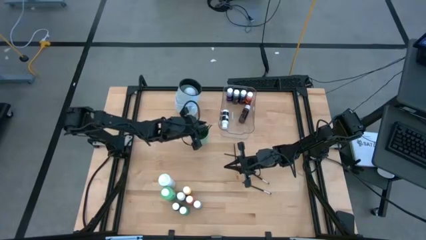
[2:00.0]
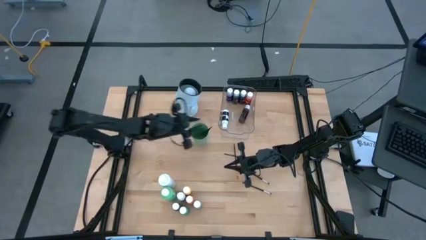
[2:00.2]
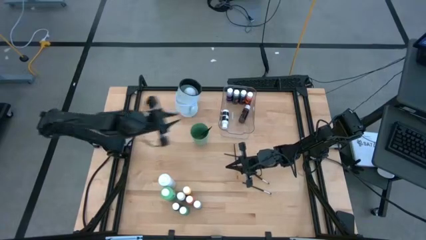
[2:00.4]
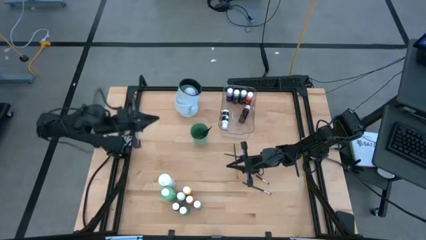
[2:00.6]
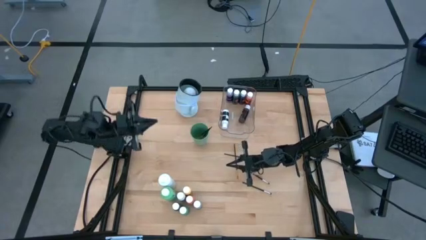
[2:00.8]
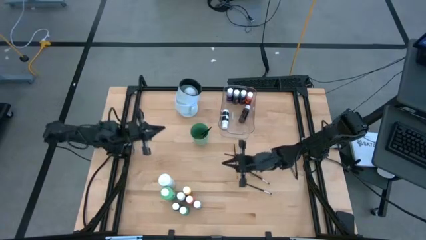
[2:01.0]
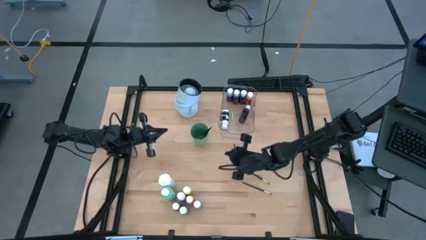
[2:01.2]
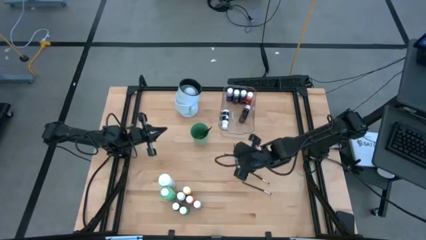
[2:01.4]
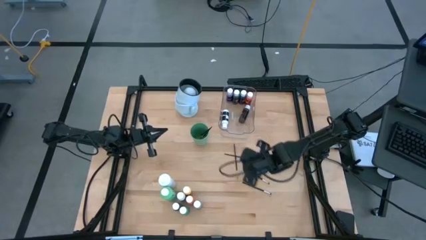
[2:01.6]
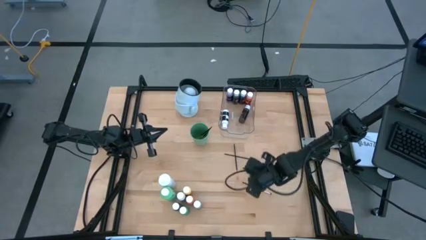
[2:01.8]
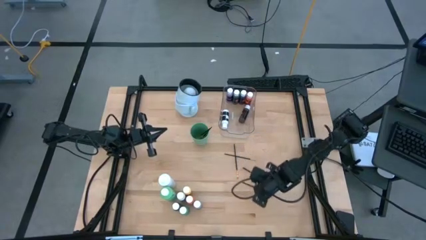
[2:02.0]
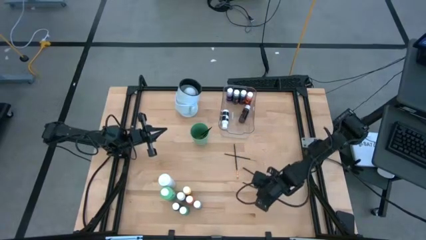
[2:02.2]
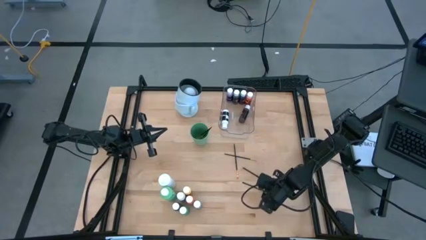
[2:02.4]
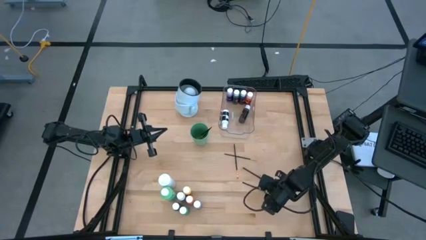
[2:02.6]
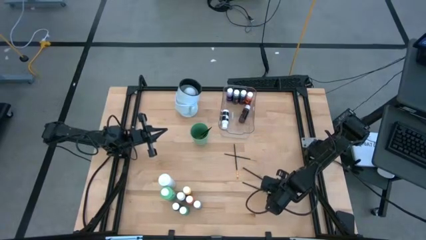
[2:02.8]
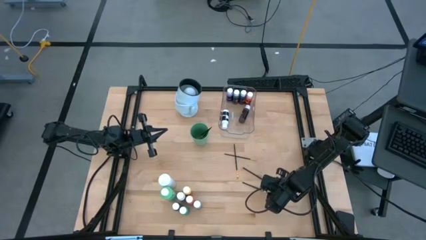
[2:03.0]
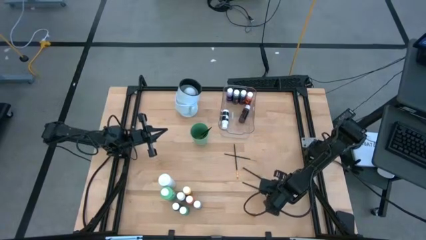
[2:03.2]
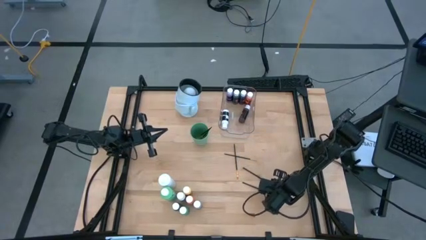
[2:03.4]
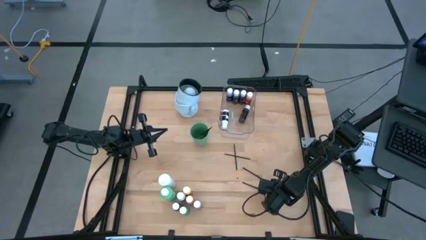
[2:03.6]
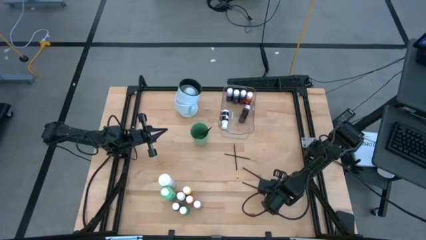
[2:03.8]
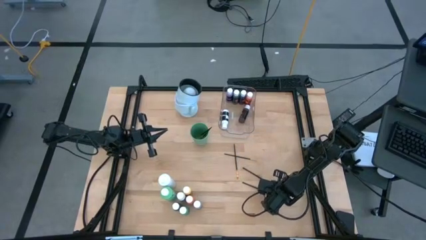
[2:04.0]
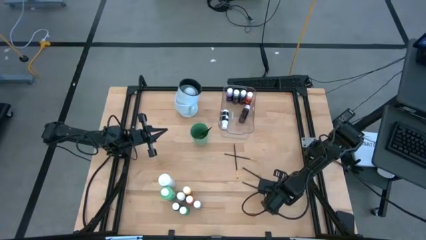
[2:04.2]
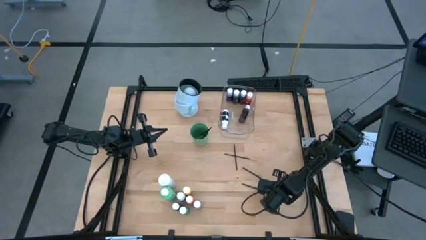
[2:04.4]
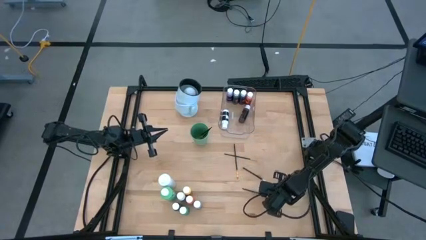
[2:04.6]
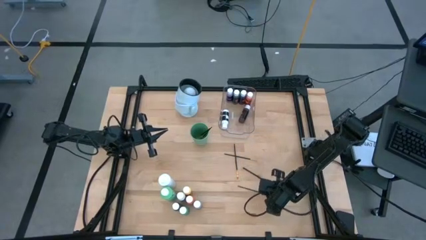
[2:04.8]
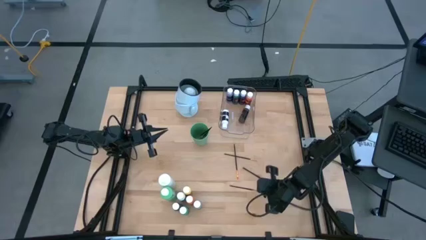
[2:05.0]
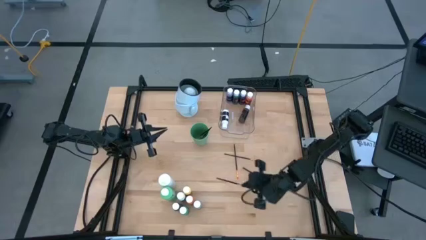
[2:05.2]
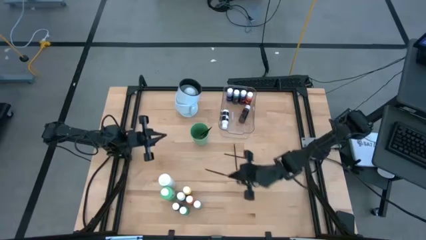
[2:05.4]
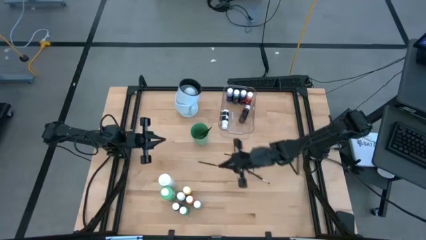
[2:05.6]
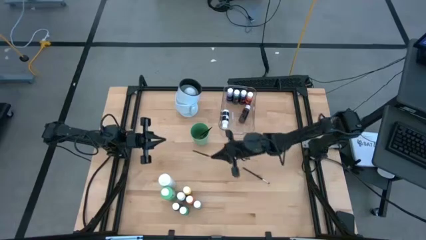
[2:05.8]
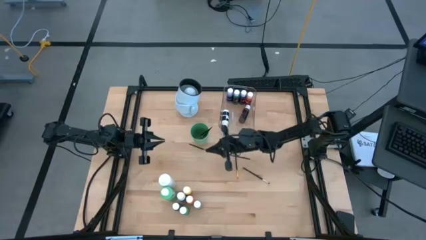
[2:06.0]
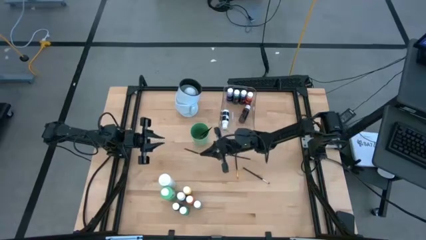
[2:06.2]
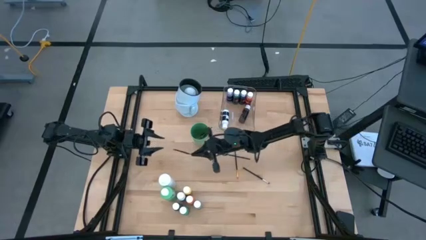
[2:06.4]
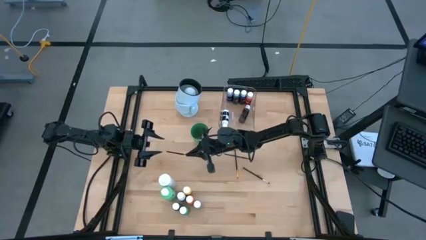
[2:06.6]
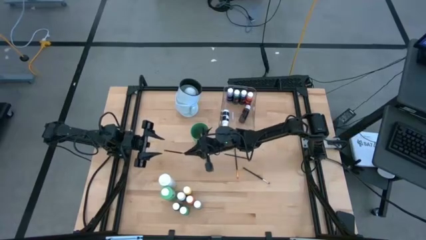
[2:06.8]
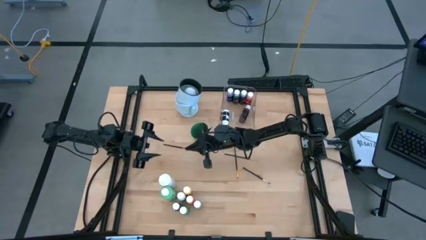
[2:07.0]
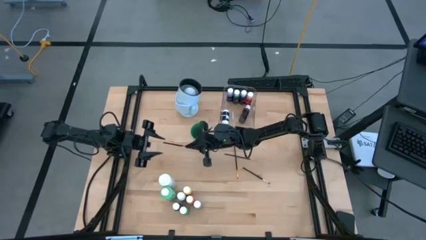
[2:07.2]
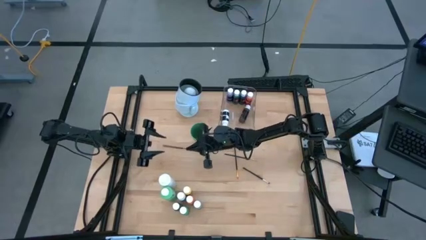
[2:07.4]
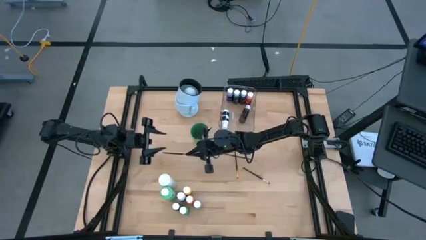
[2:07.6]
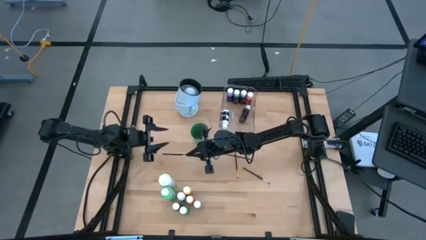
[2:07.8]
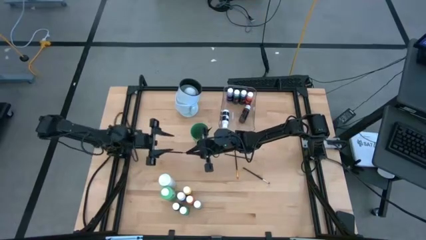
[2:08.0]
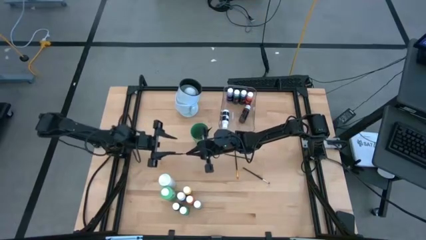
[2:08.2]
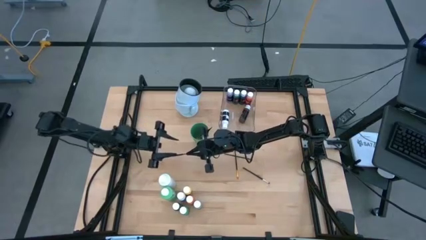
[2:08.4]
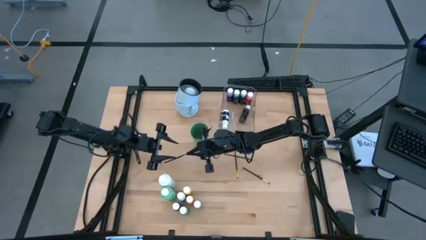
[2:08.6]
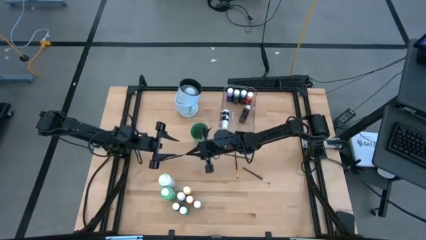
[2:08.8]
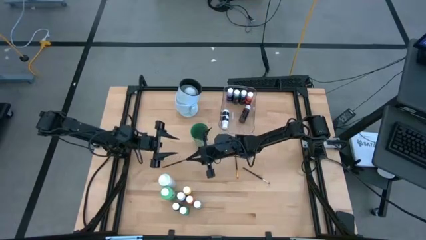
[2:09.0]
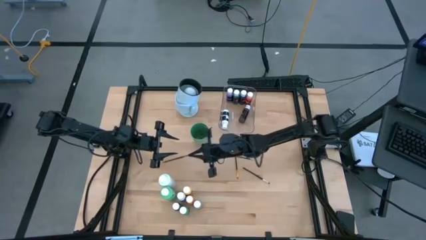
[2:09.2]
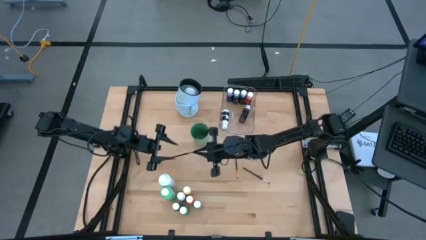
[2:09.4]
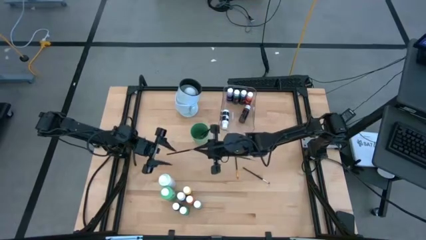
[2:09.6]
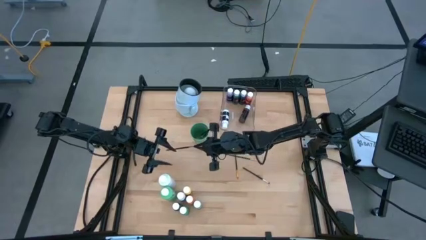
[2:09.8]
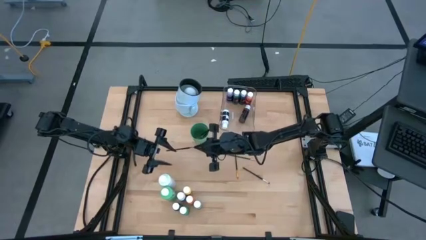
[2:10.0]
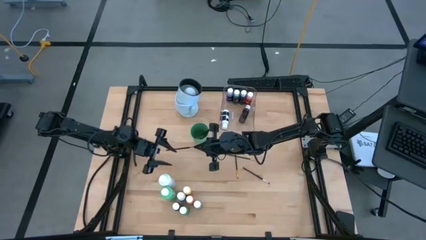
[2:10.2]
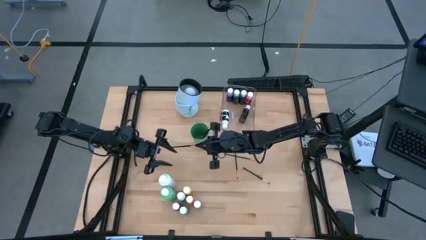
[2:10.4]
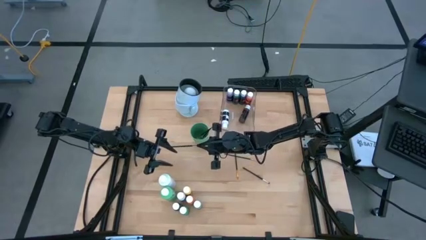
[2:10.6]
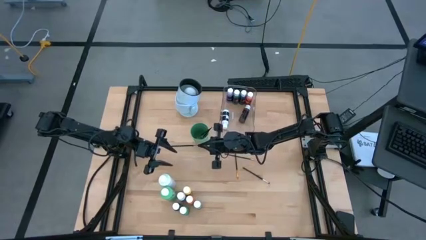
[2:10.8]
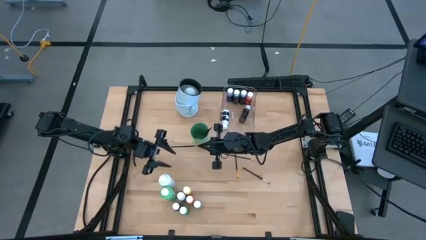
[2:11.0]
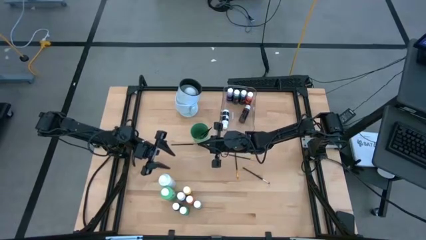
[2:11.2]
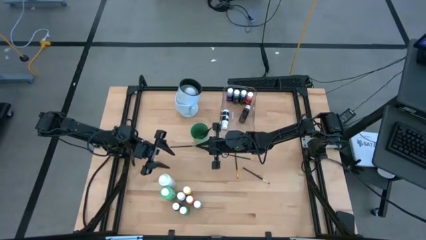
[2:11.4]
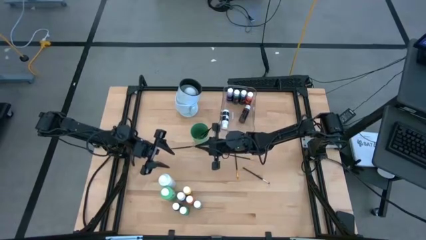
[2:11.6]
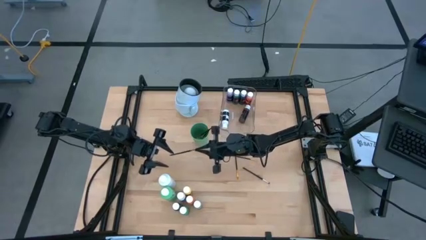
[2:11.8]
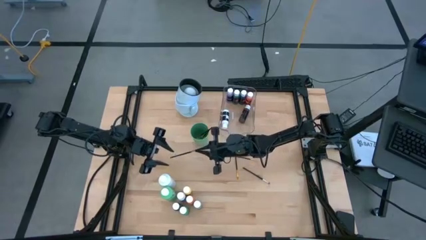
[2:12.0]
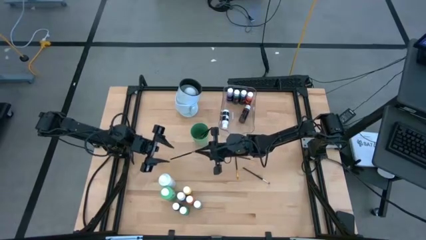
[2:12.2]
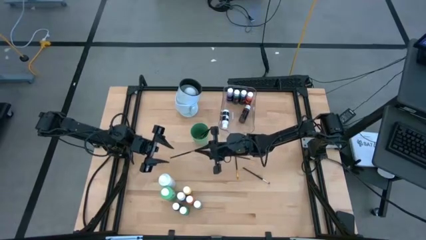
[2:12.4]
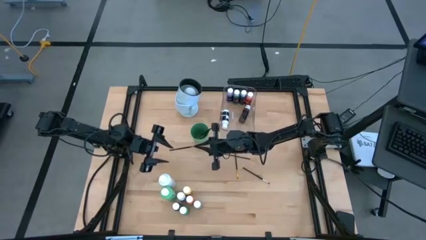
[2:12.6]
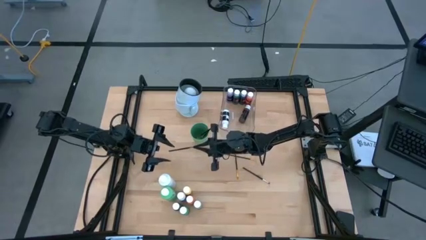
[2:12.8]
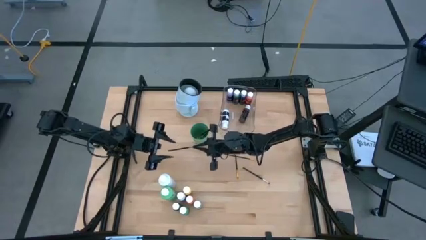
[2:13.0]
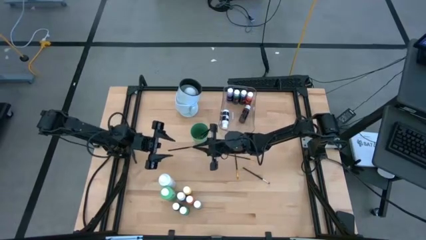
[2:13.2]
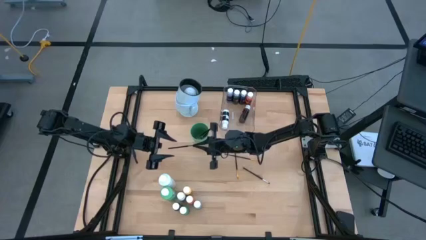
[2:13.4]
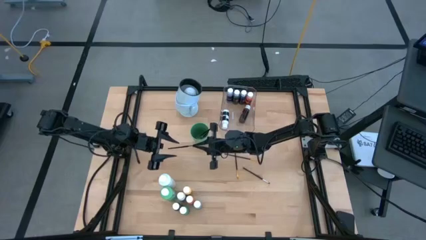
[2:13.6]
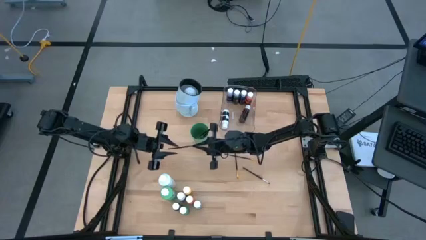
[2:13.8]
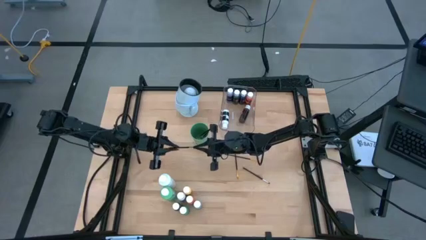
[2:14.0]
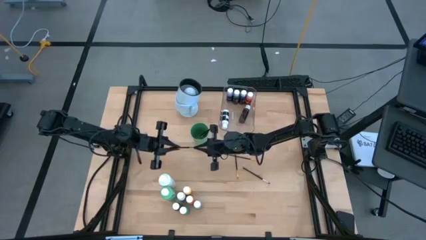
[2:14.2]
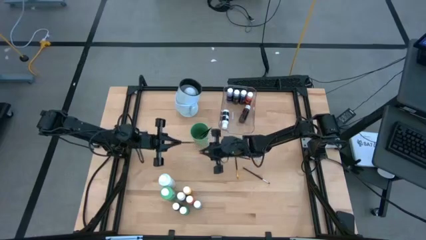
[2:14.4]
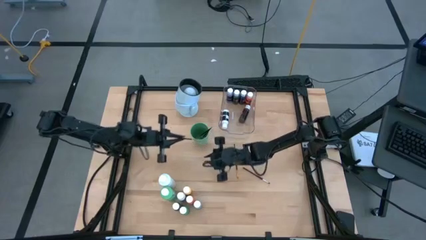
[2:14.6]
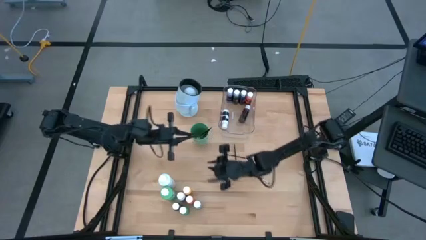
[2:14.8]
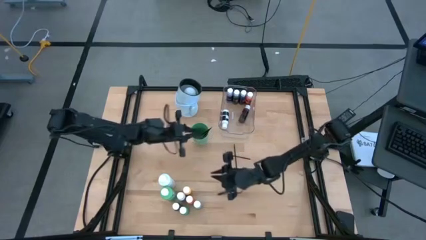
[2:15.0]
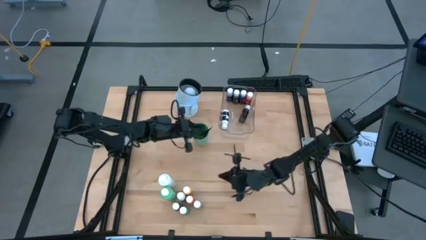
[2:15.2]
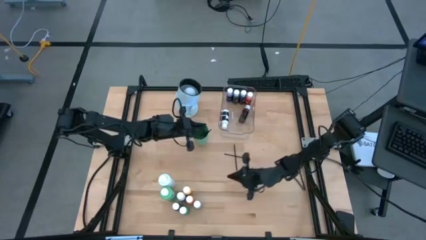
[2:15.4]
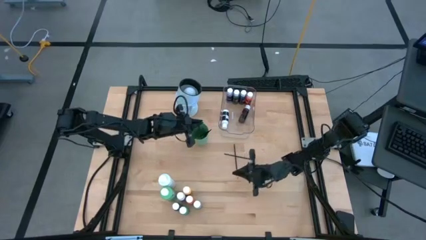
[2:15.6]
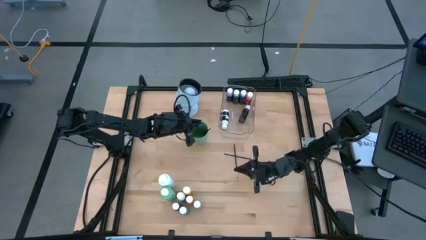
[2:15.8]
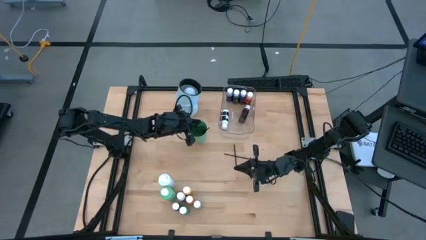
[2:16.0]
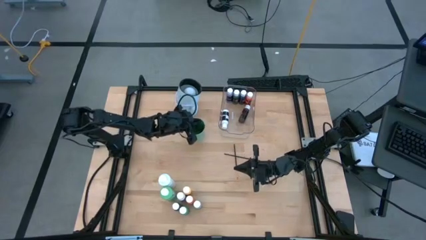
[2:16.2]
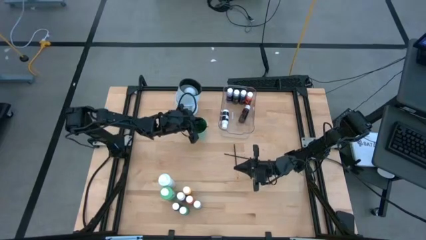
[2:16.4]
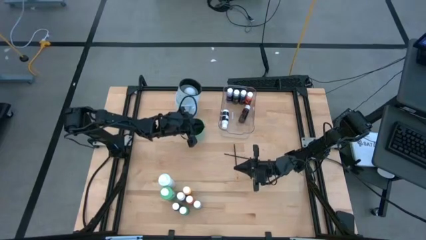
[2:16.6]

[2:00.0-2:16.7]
Task: Pick & Place Paint Supplies
Put the silver paintbrush into the green cup
